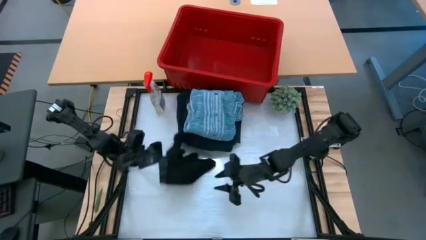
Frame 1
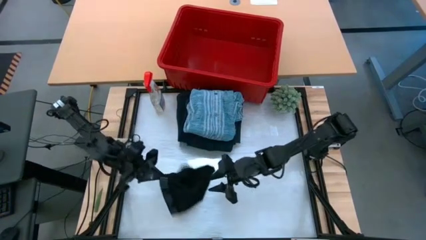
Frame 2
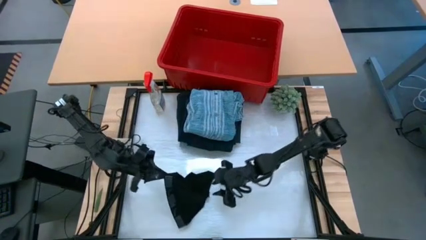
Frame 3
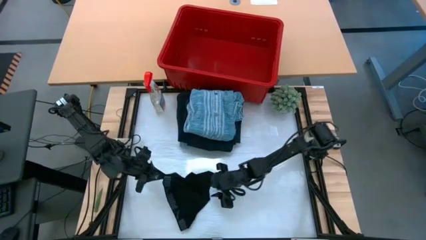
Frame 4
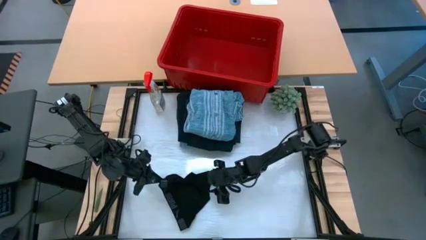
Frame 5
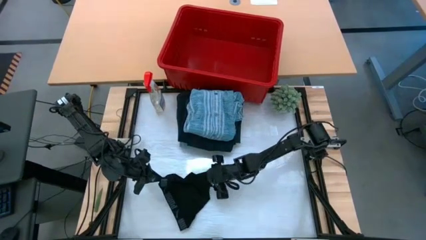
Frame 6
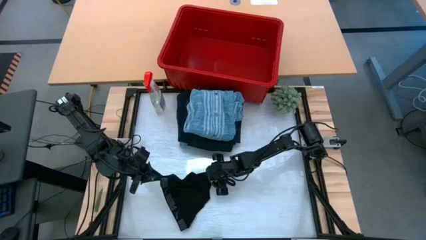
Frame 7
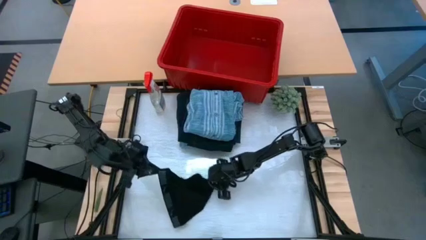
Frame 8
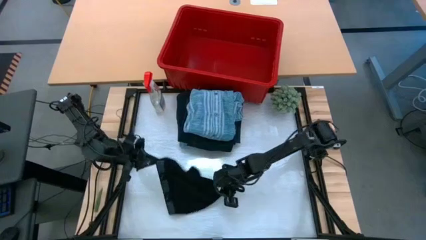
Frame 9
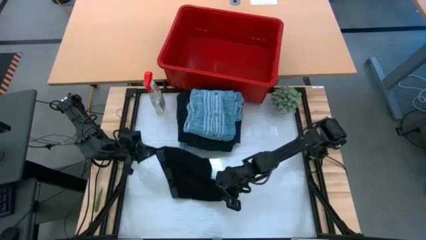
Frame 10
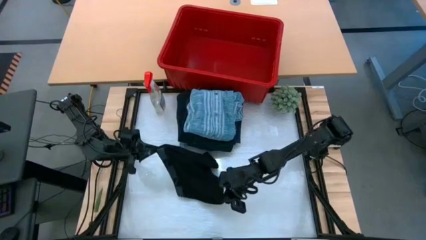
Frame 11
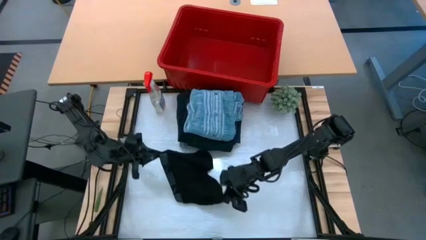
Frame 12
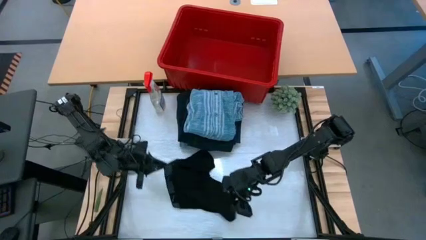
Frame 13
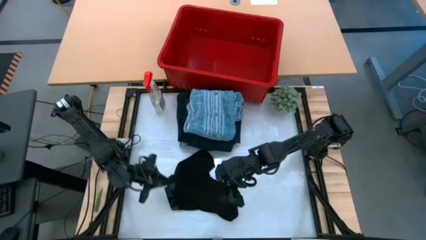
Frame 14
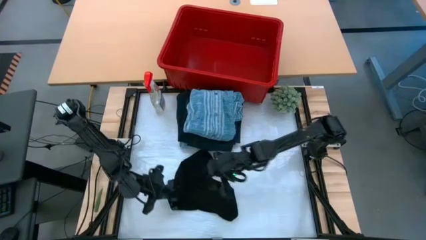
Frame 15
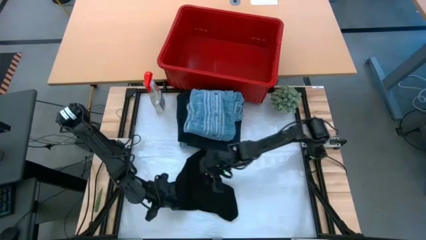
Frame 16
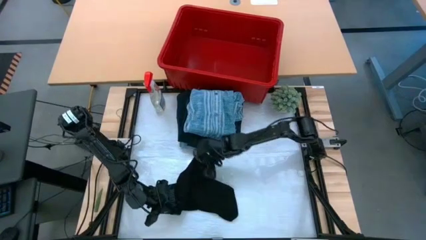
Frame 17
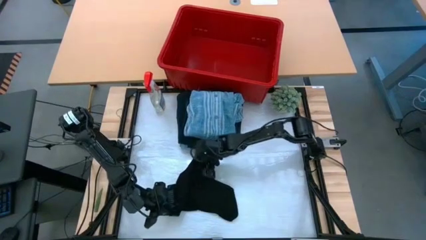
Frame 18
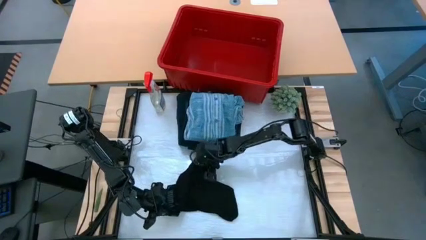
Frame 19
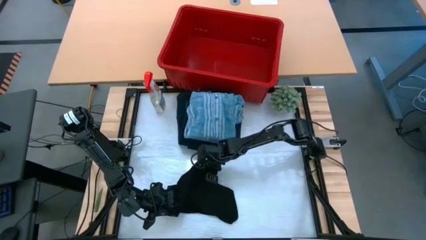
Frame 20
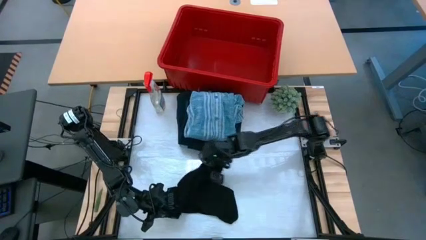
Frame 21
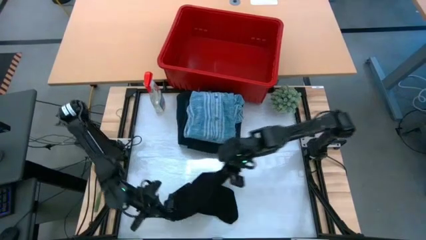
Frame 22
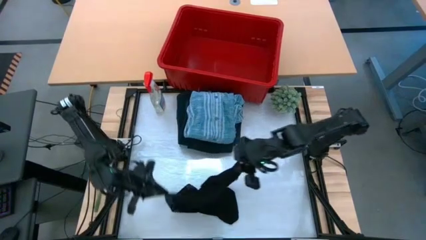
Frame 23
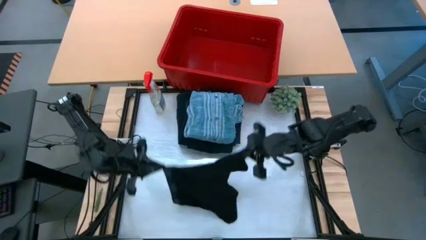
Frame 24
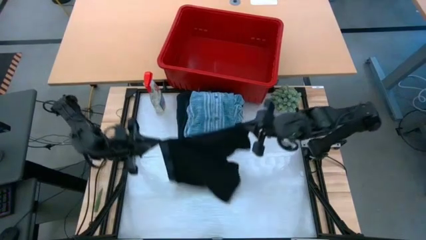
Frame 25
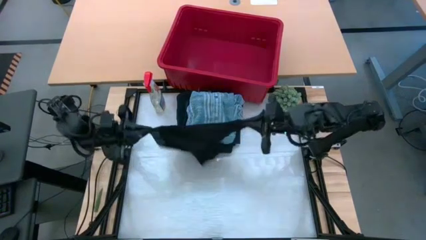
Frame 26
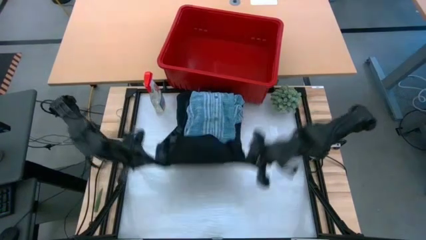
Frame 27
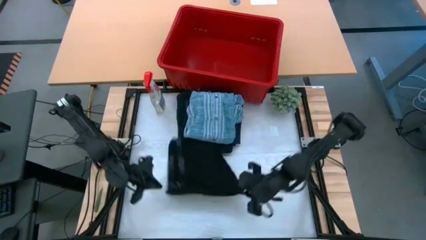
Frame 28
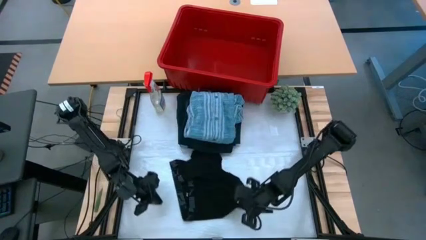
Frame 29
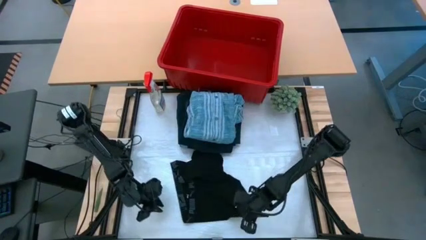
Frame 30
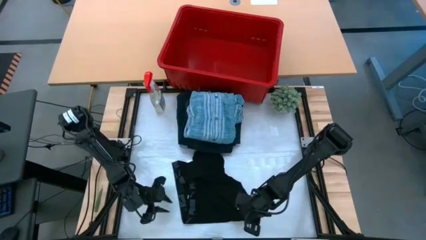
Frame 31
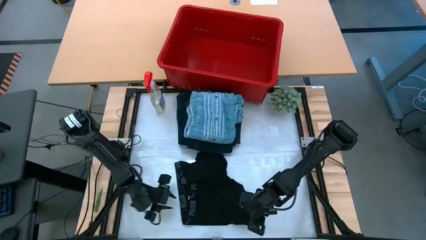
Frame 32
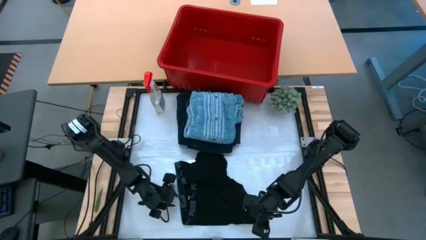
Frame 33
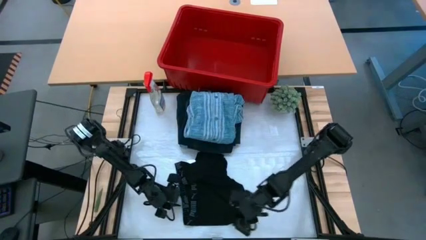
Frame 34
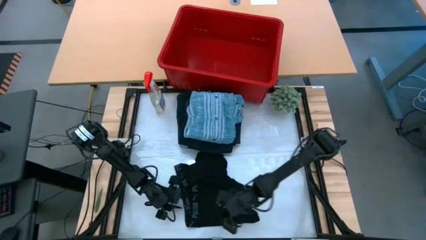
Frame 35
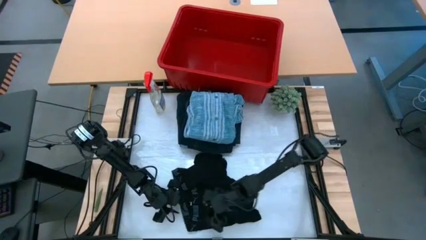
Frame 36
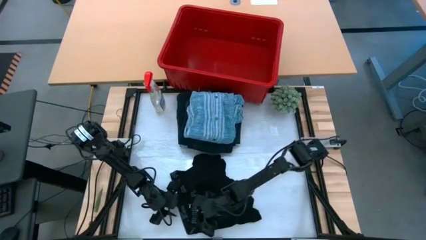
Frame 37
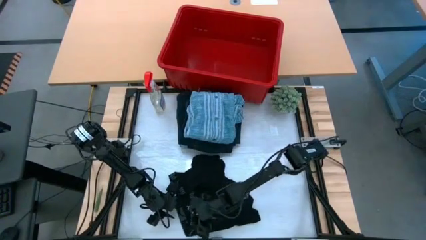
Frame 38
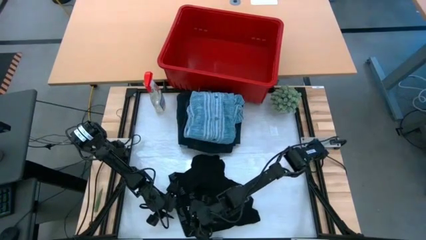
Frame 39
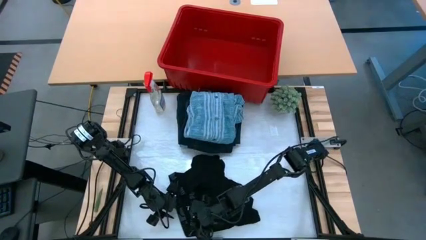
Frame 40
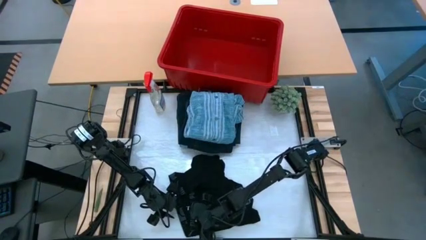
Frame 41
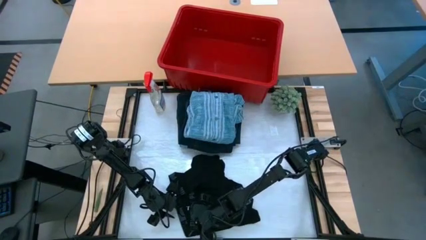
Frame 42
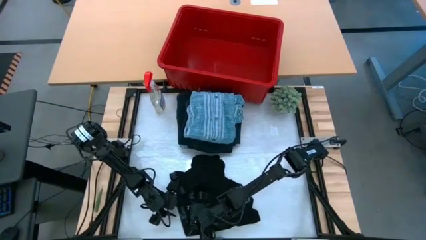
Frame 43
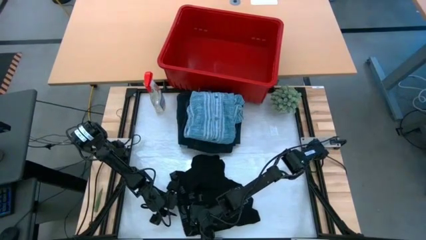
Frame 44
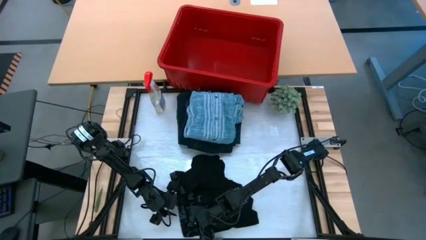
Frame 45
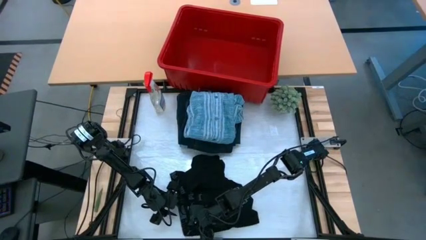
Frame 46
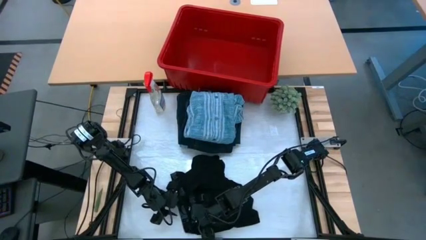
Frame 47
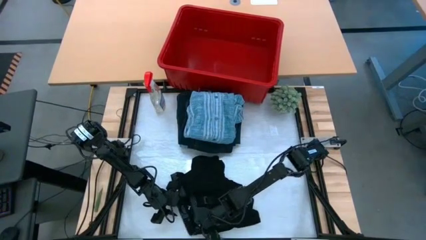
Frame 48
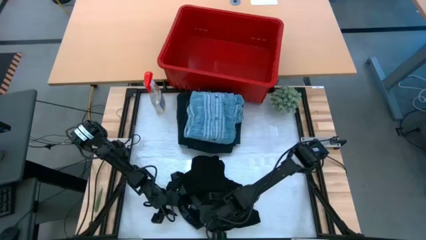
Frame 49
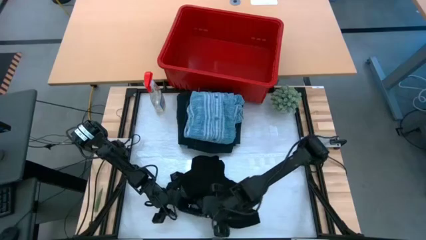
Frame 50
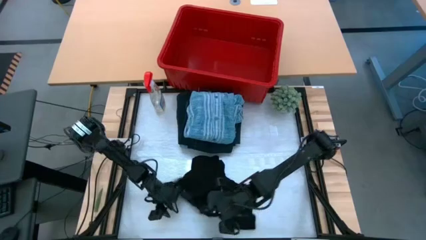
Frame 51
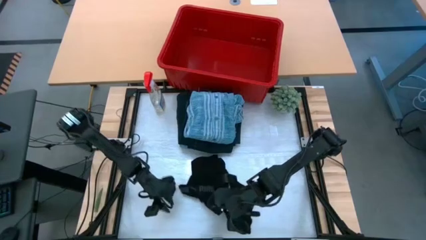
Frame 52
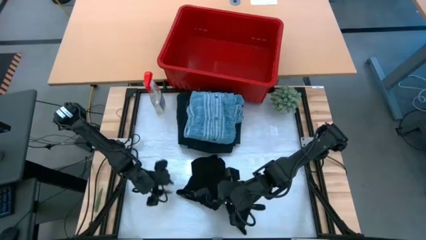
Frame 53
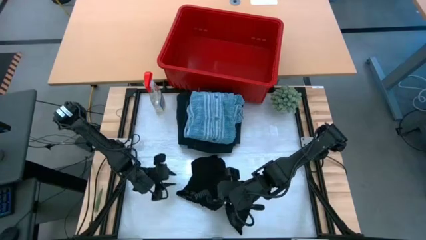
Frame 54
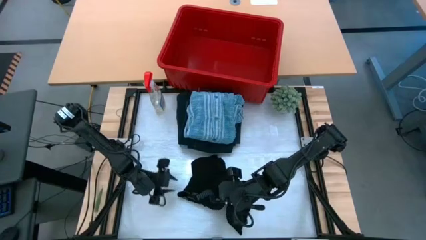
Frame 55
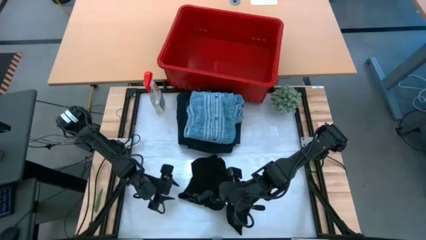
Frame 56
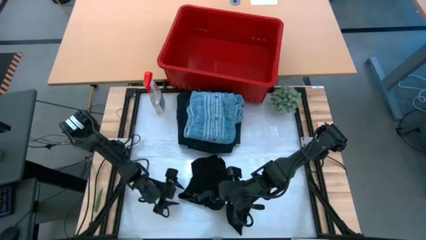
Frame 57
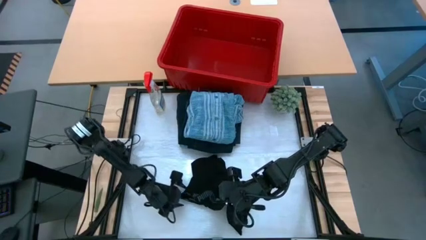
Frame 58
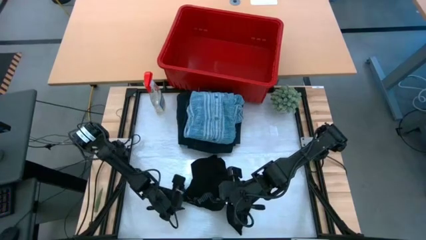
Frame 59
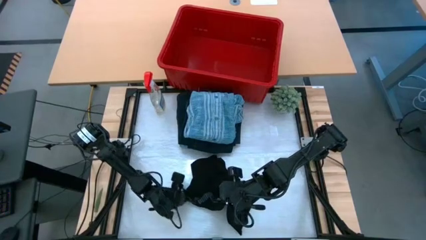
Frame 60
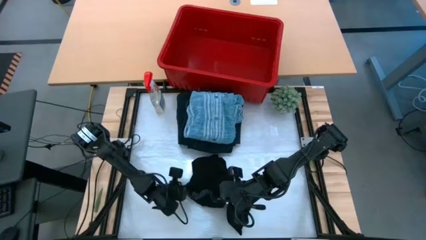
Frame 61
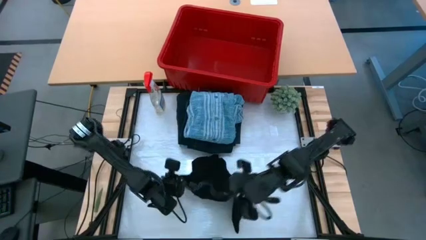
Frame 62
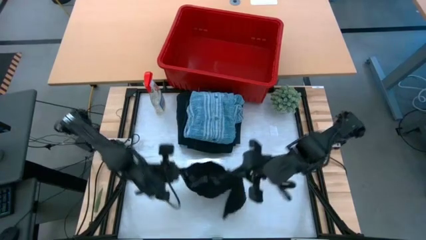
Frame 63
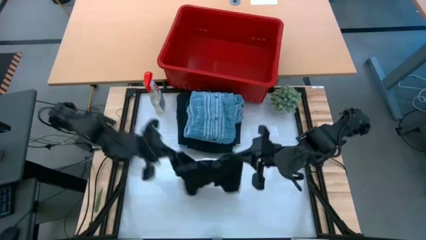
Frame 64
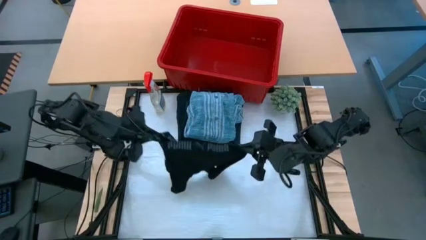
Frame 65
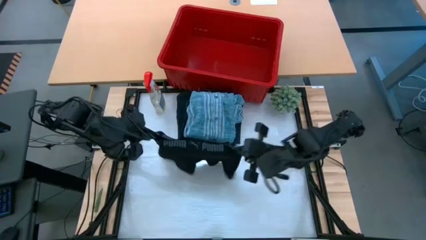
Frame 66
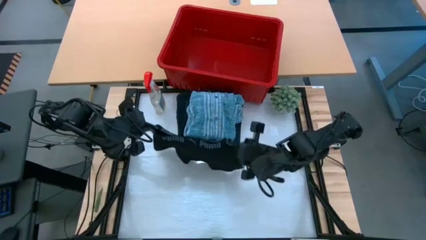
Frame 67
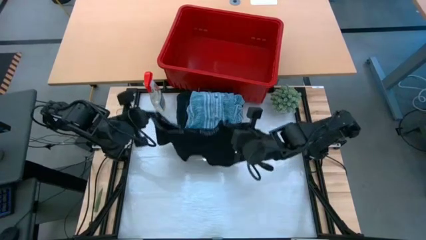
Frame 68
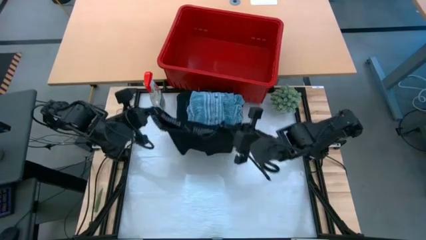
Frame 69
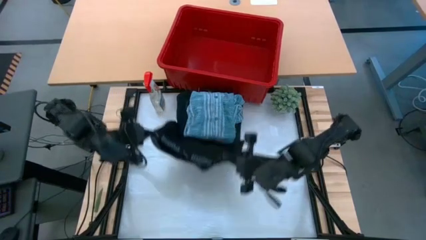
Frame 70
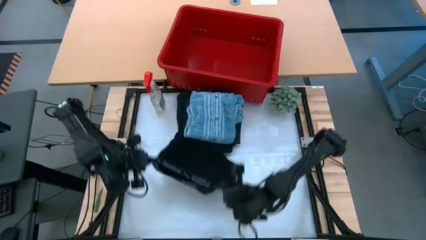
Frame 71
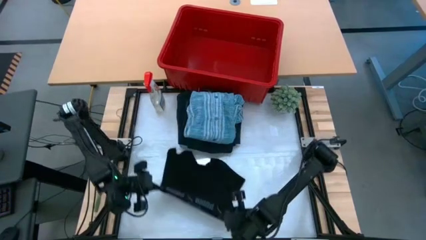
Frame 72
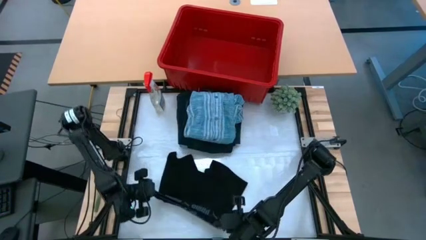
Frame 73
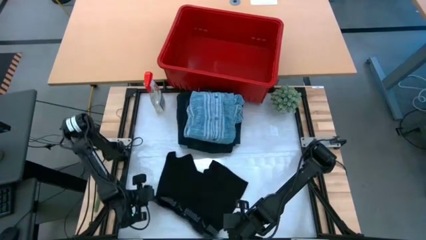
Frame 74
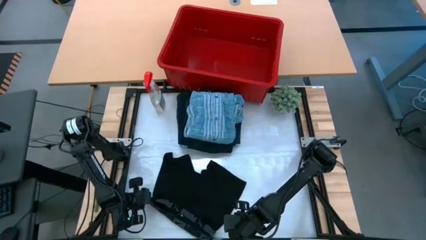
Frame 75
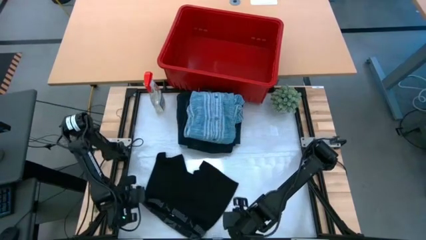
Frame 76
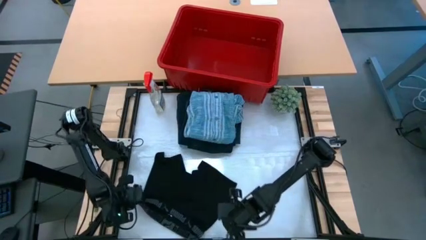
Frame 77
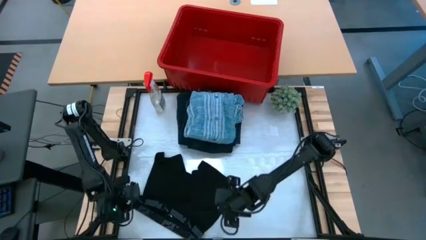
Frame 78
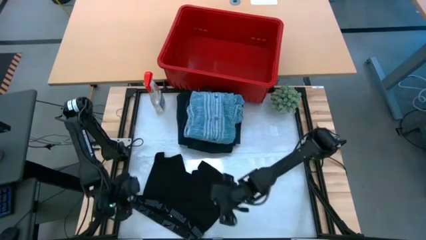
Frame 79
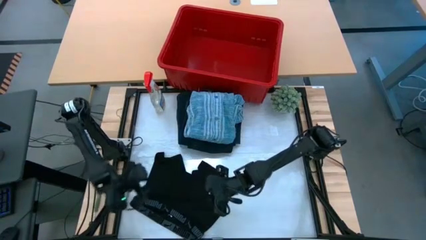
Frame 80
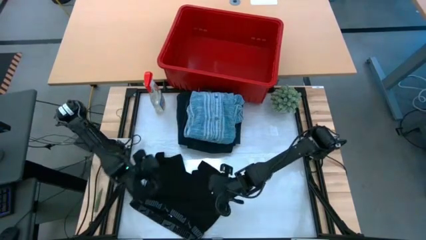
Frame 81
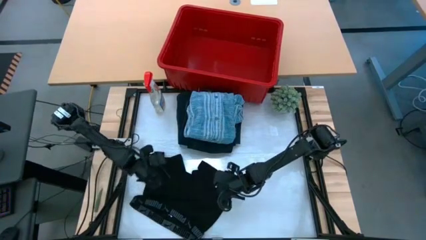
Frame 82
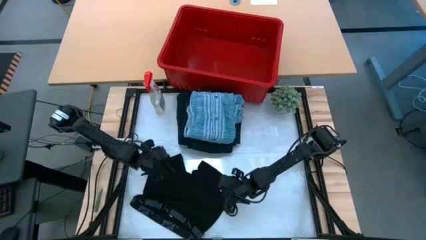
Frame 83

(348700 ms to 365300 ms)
Task: Fold Laundry from Bin
Fold the black underwear from the red laundry
